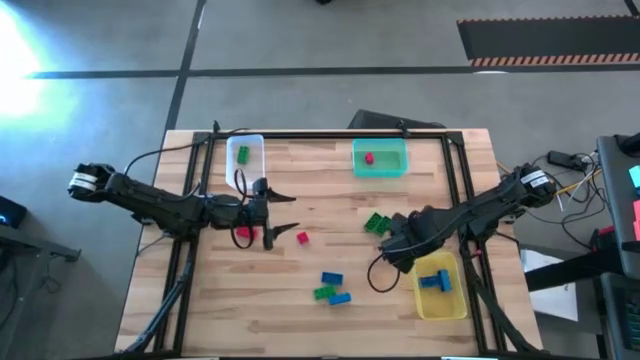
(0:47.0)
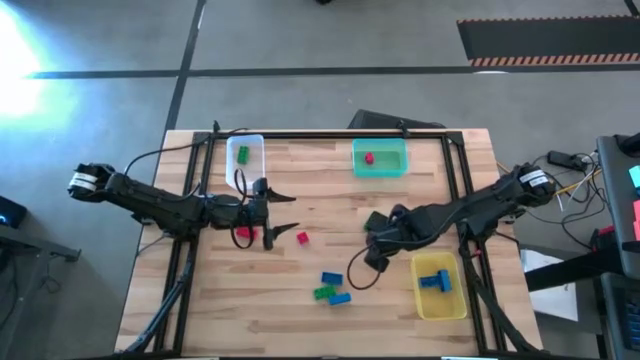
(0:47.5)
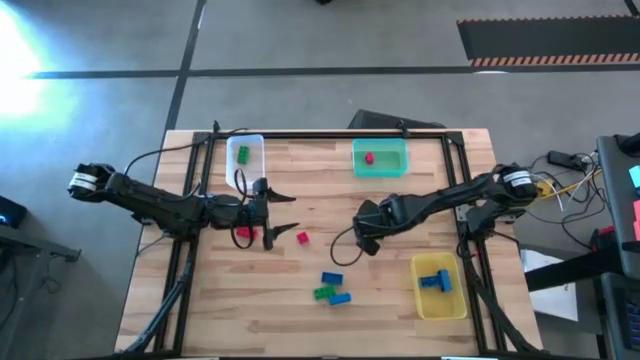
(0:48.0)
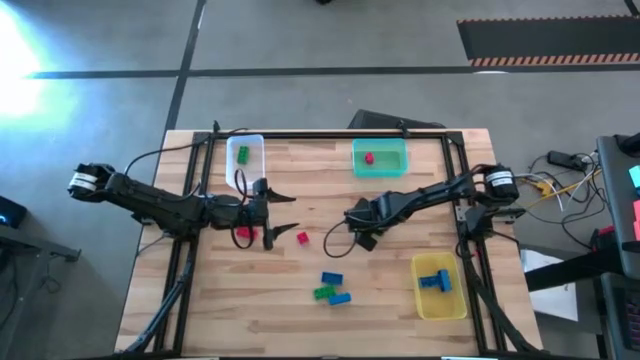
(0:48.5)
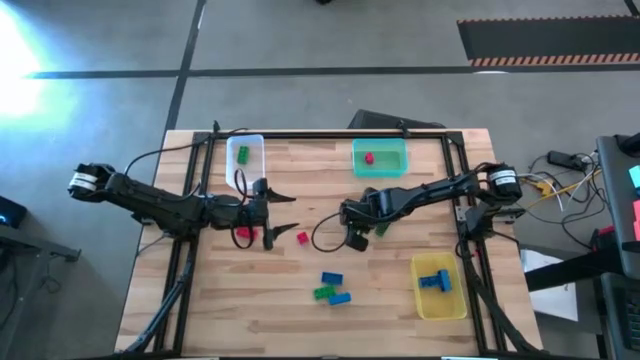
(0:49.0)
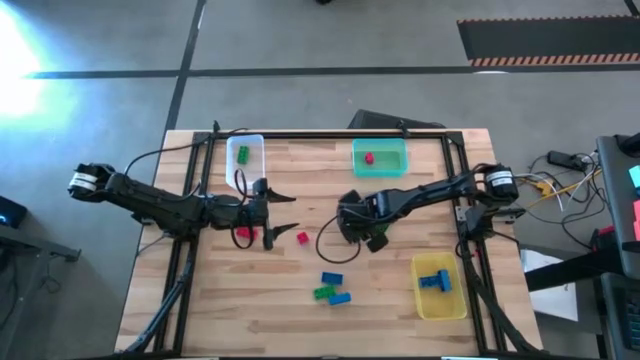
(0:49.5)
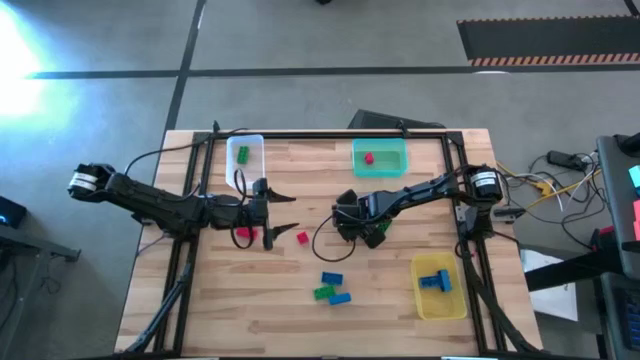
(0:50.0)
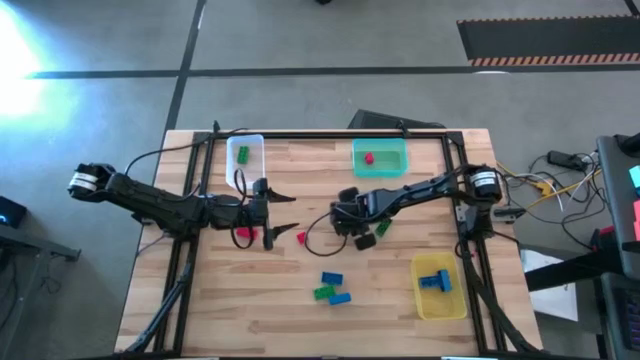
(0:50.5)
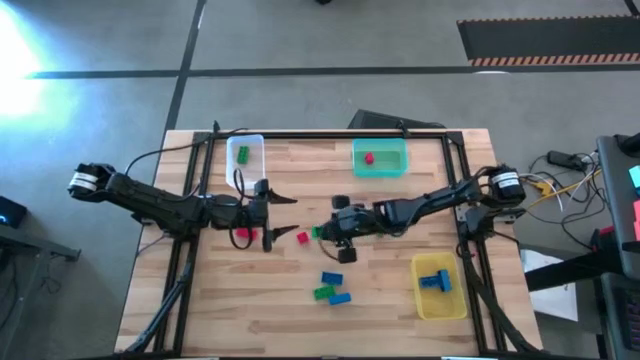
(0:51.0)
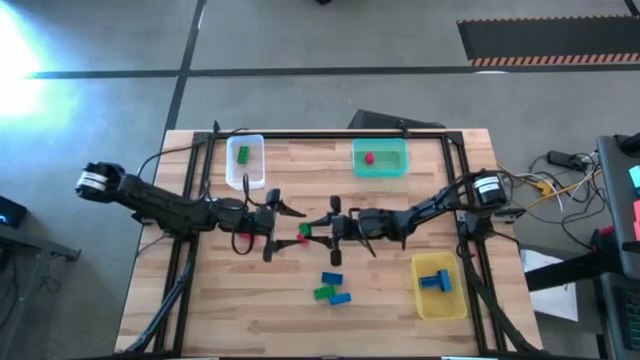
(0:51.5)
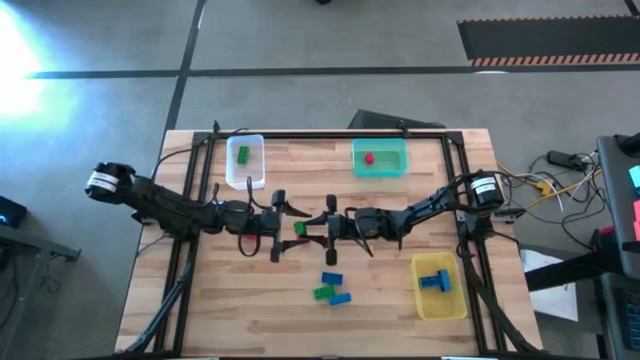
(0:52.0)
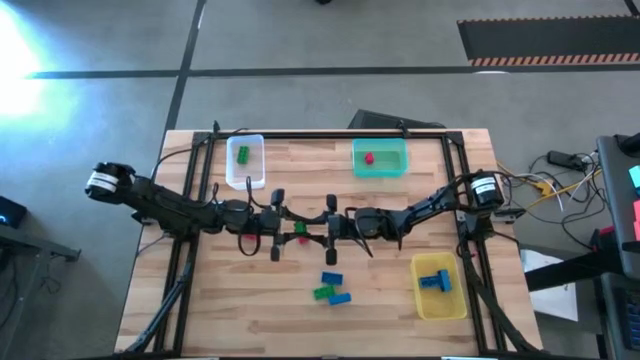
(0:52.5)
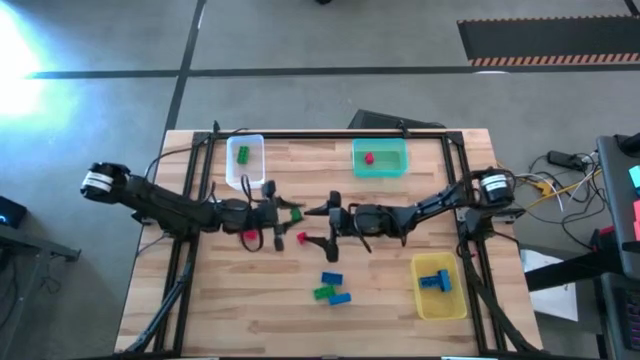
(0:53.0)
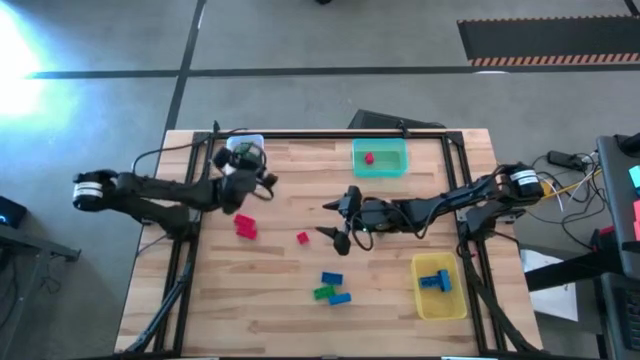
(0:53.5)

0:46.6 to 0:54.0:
Task: Sort & place blocks by color
Put the green game piece into the white bin

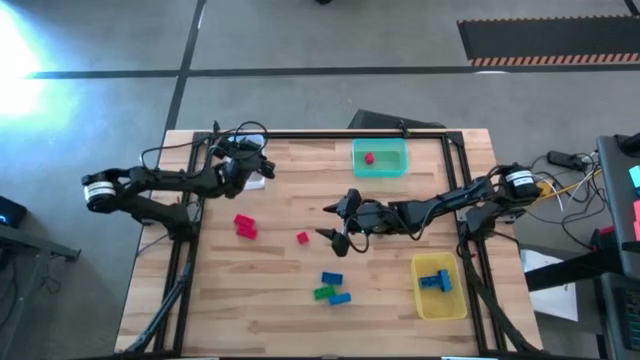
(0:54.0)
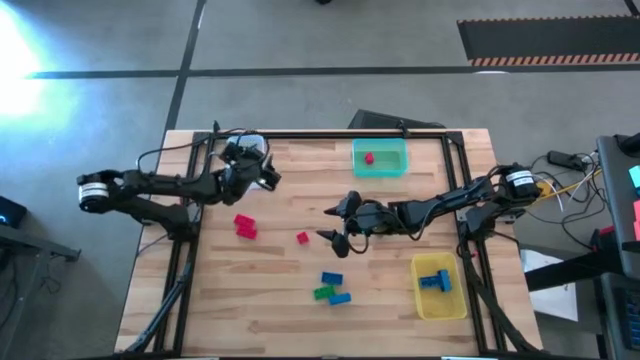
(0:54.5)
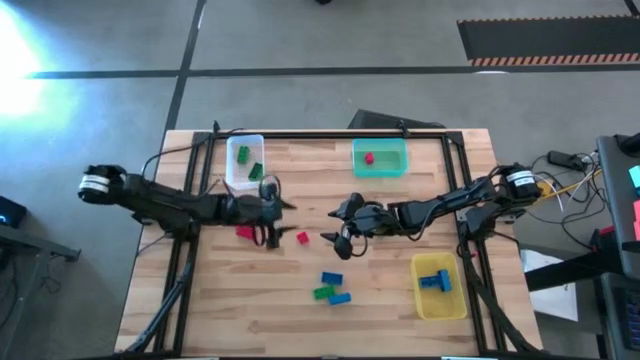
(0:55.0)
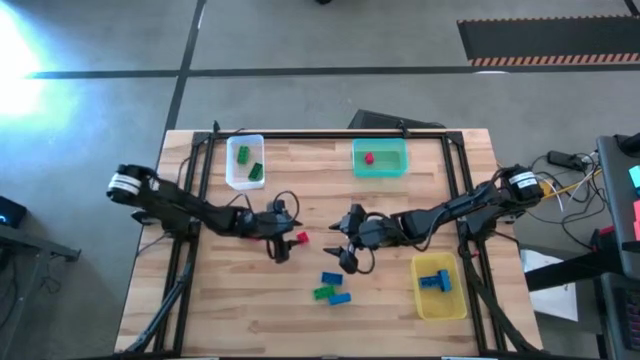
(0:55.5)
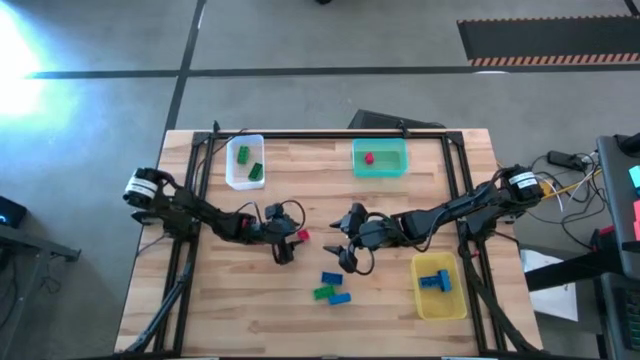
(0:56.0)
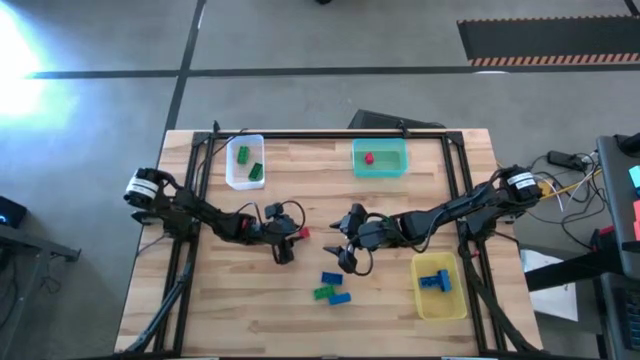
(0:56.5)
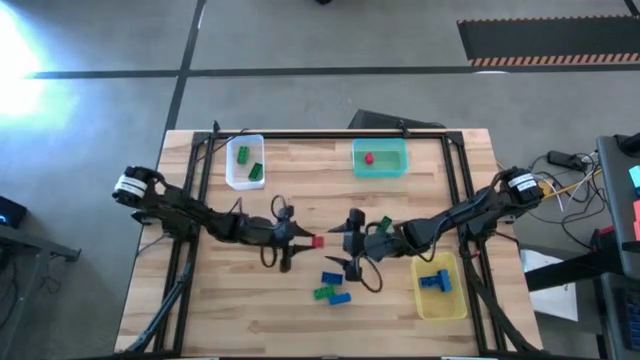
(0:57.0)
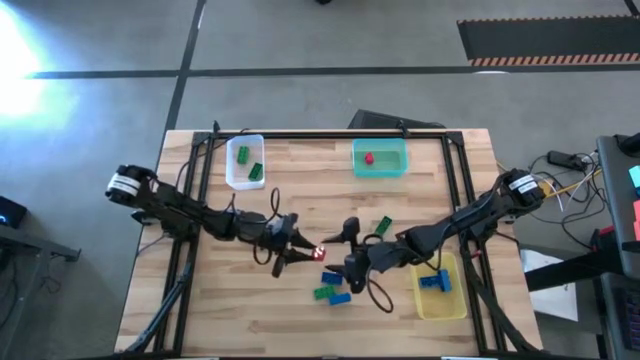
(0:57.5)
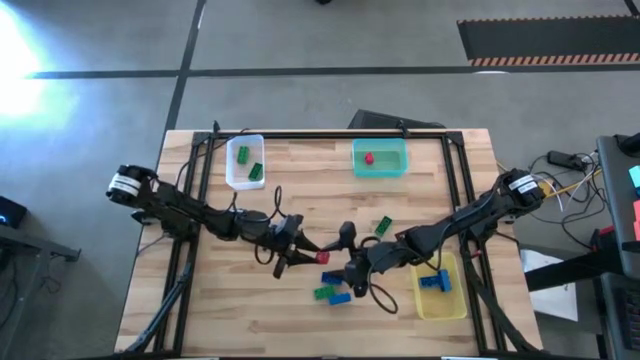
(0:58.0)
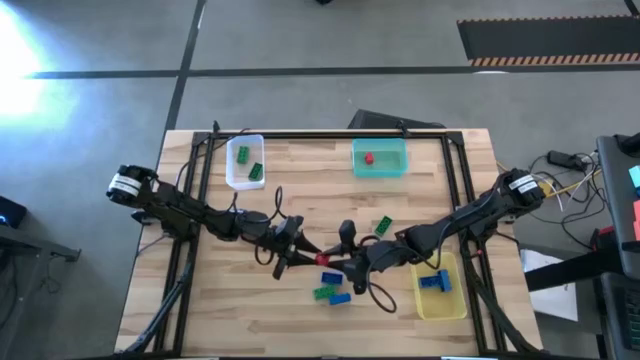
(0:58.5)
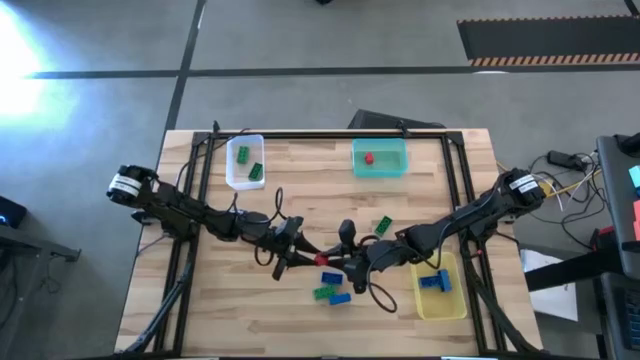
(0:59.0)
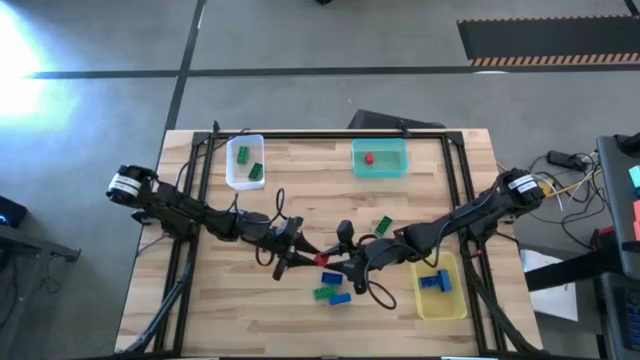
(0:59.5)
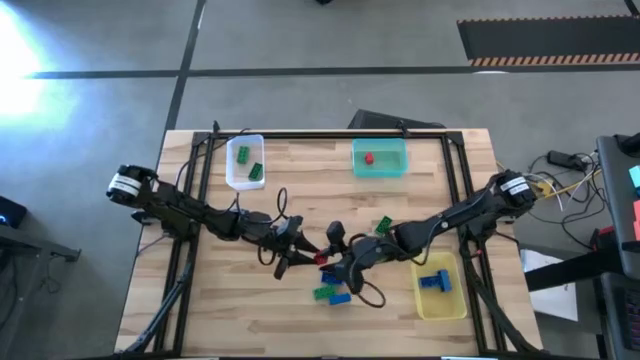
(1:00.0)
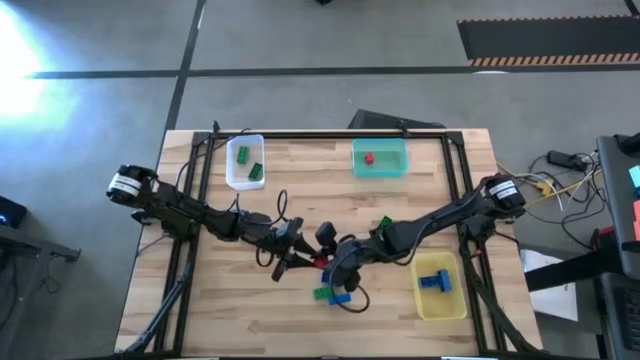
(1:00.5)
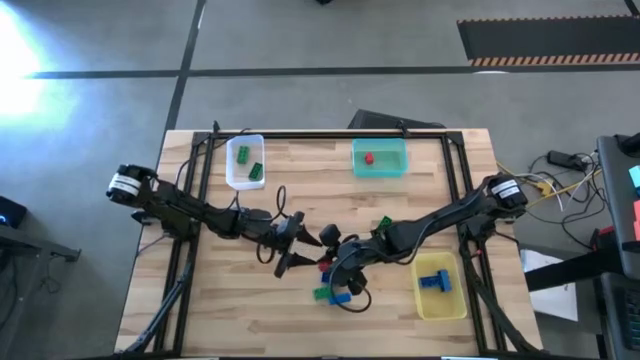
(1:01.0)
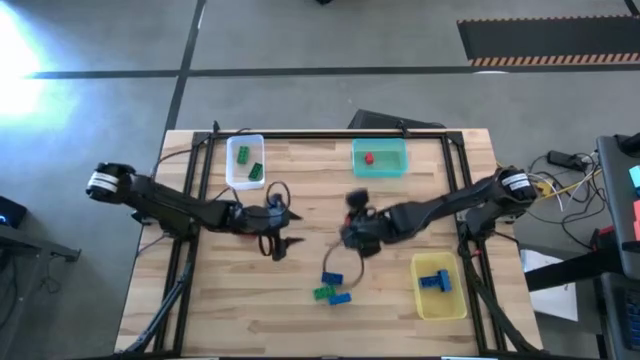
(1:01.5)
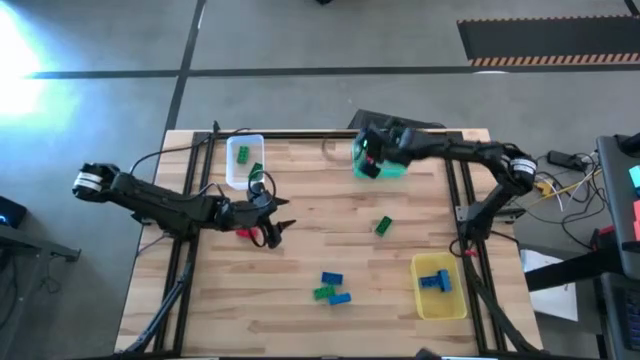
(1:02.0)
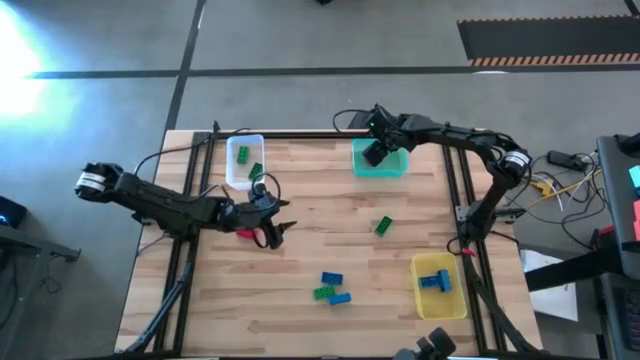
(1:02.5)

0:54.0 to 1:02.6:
Put the red game piece into the green bin

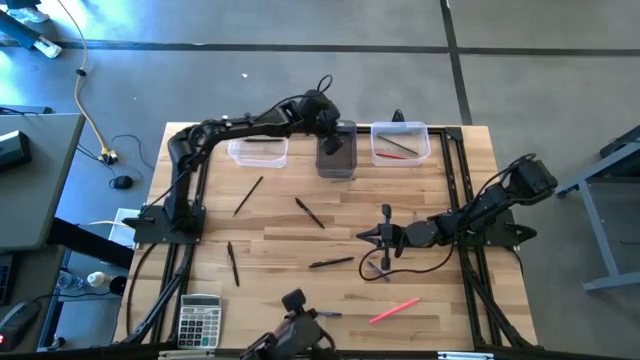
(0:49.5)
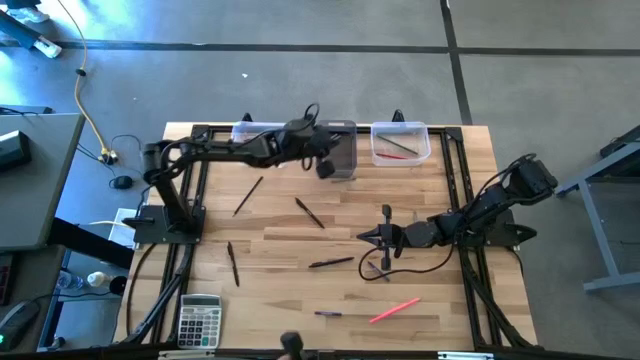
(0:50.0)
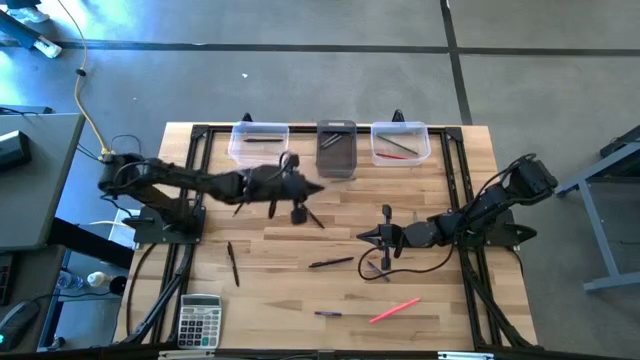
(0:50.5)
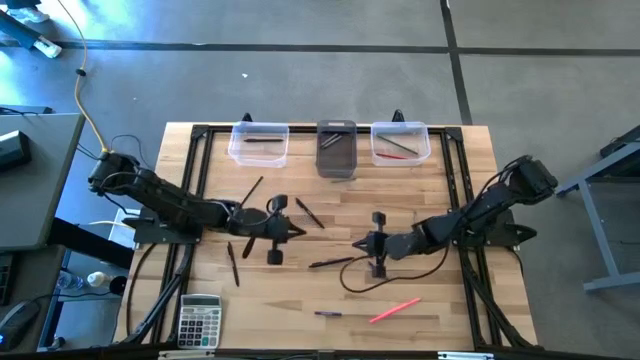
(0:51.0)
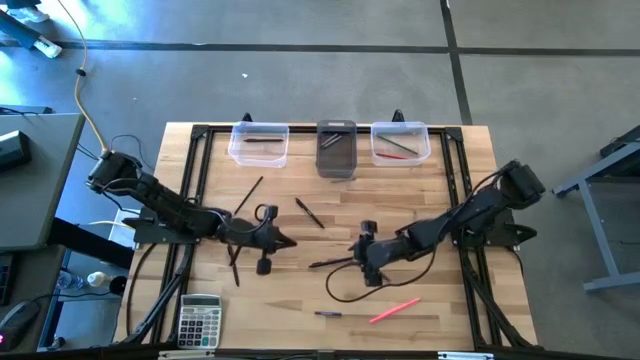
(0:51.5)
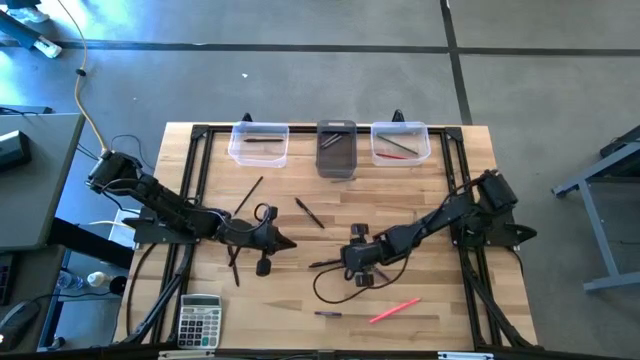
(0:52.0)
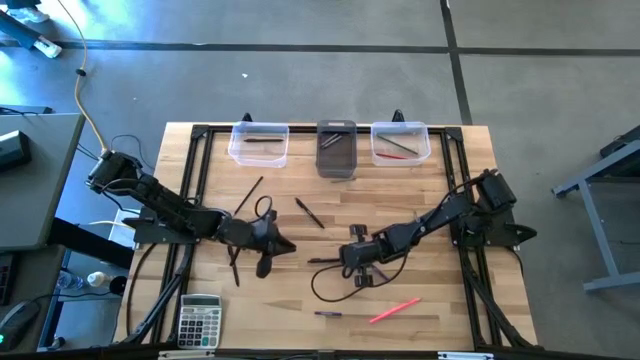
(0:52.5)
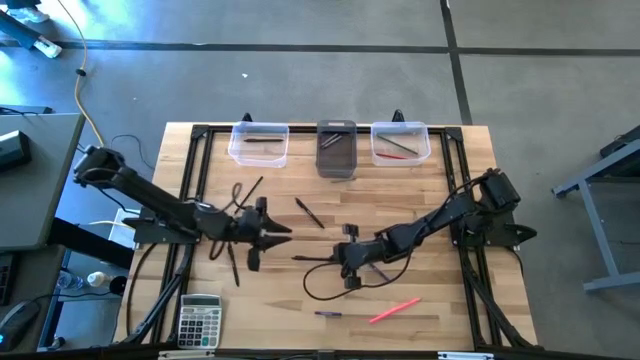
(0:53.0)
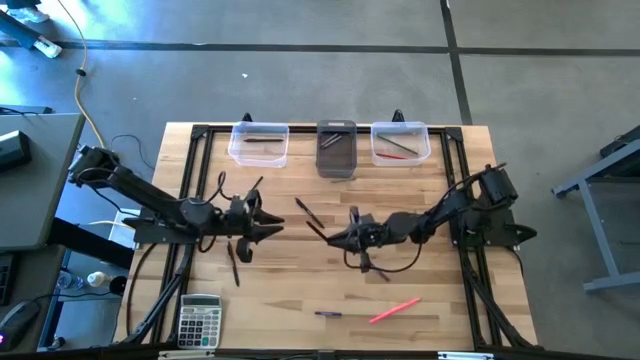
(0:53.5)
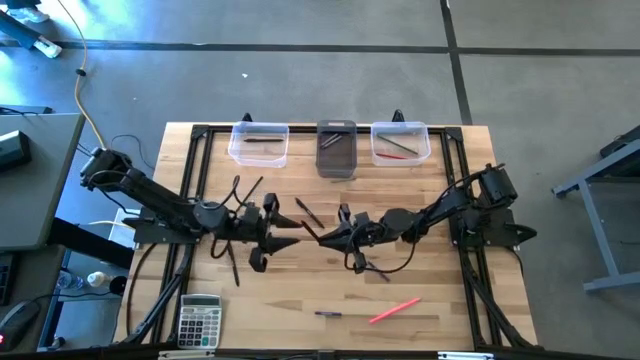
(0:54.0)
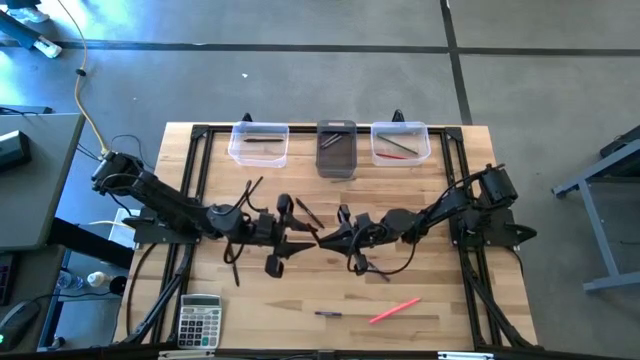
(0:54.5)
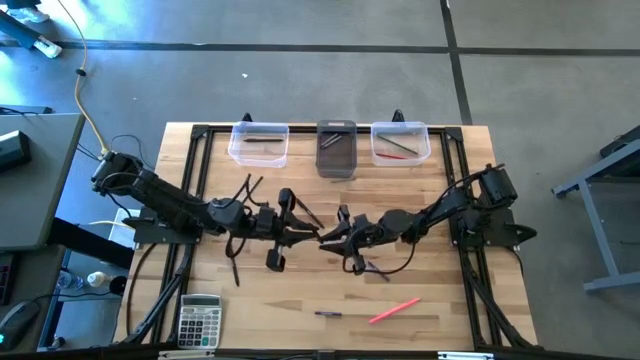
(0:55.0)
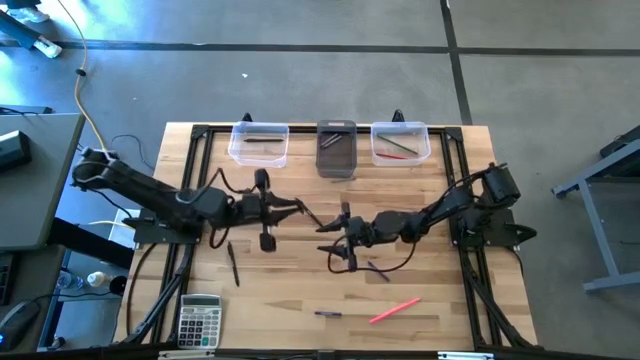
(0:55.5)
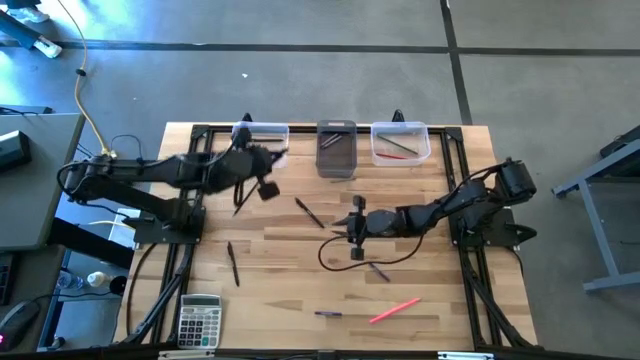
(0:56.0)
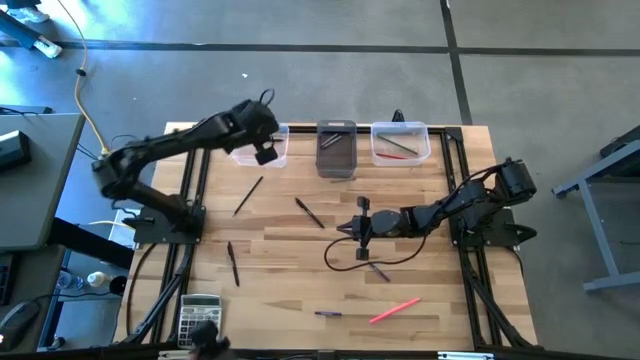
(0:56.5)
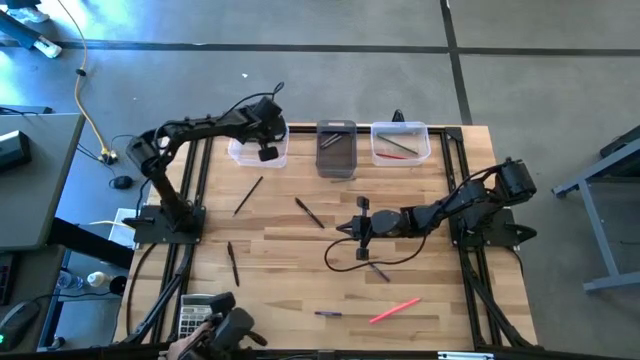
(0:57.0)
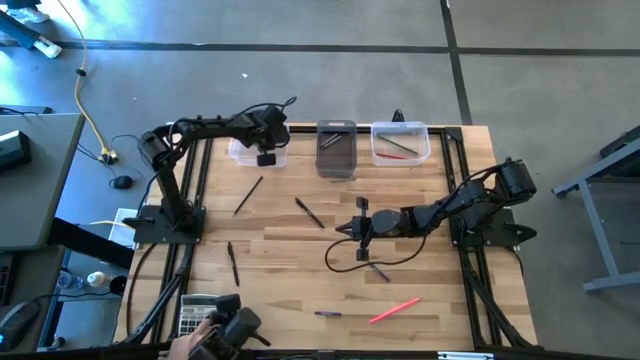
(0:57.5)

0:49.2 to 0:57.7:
Task: Sort crayons/erasers/pens/pencils in bins
Put the black pen into the left transparent bin
